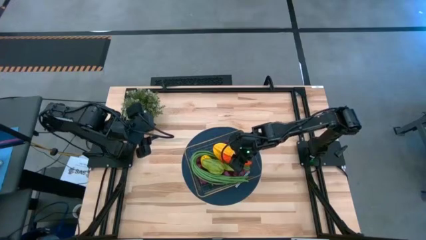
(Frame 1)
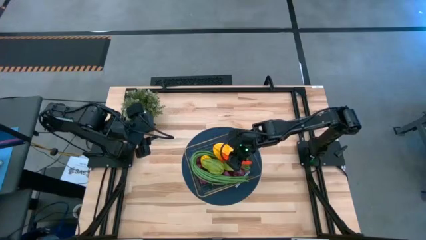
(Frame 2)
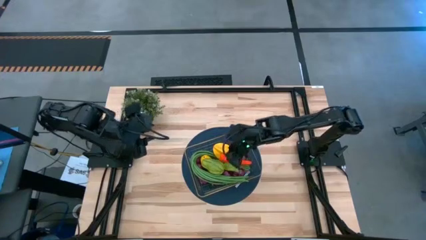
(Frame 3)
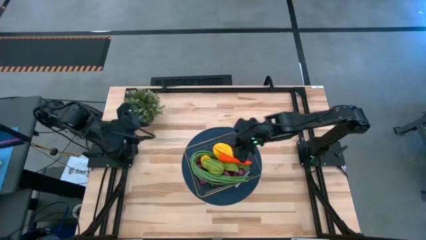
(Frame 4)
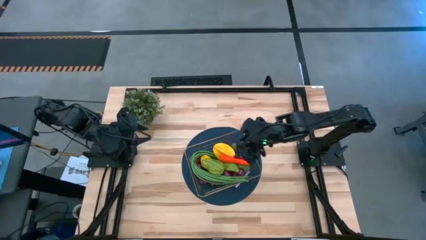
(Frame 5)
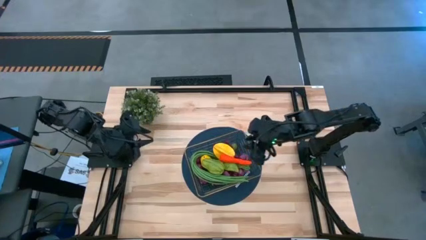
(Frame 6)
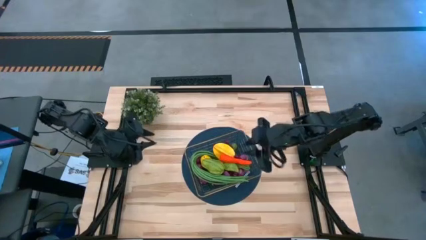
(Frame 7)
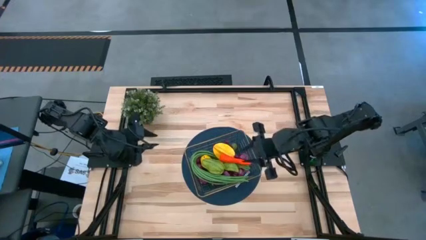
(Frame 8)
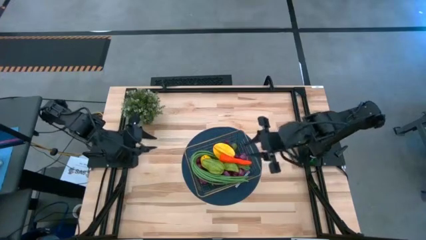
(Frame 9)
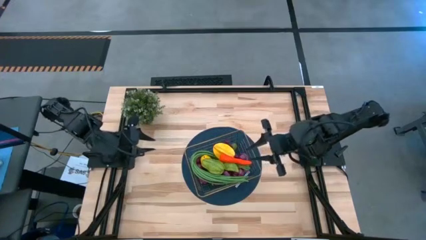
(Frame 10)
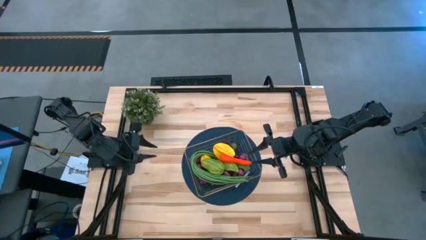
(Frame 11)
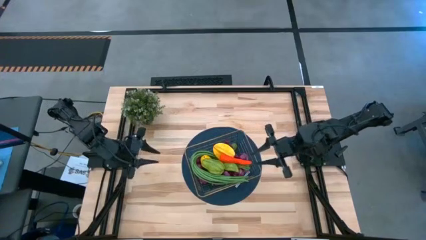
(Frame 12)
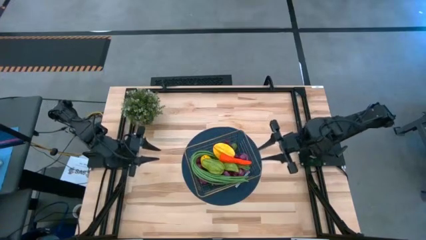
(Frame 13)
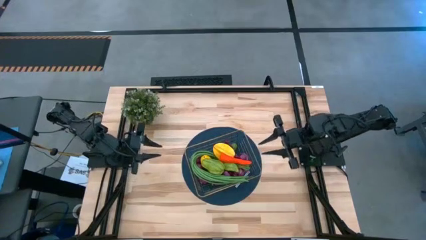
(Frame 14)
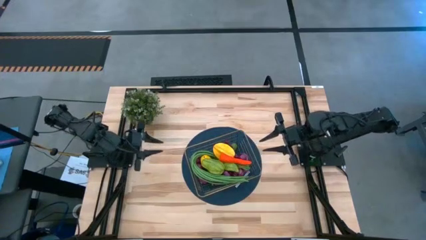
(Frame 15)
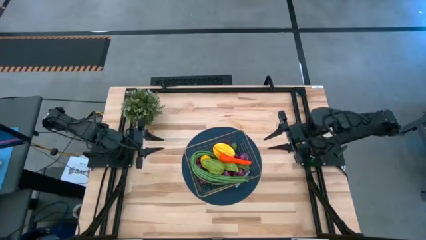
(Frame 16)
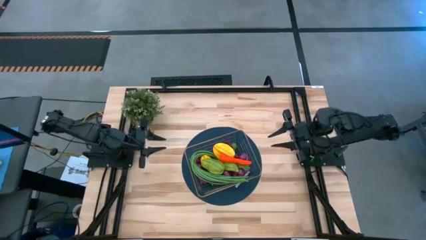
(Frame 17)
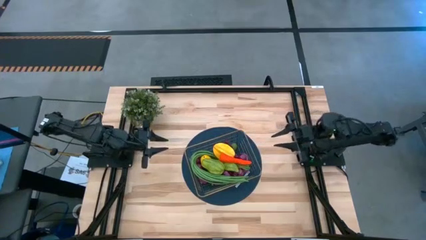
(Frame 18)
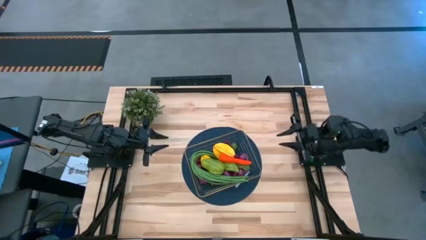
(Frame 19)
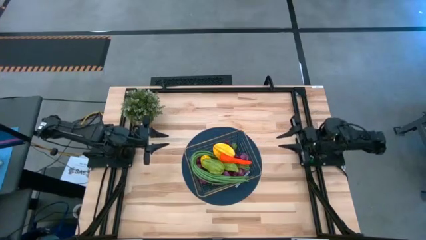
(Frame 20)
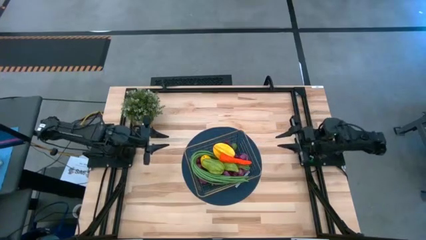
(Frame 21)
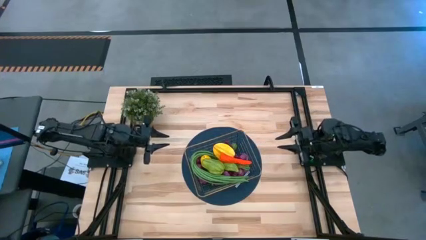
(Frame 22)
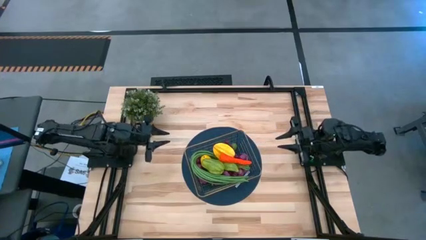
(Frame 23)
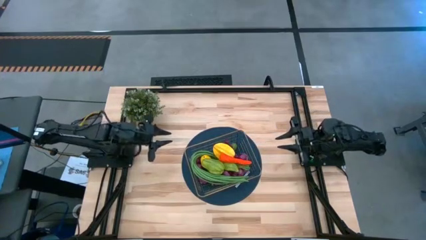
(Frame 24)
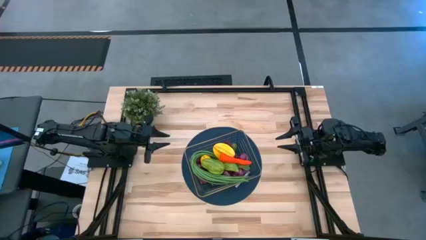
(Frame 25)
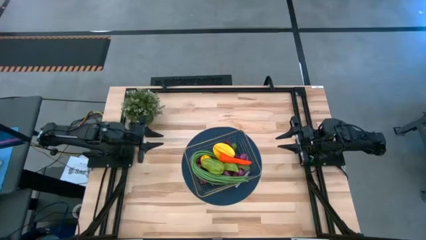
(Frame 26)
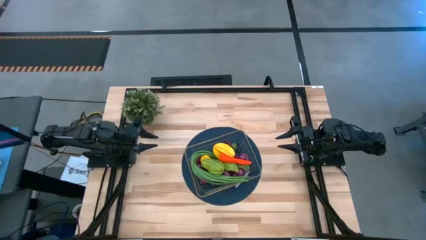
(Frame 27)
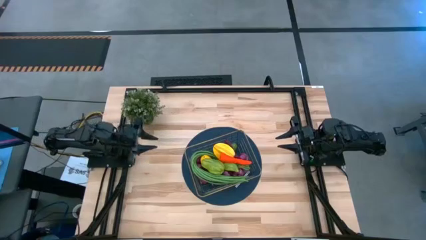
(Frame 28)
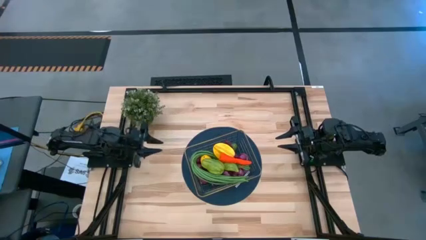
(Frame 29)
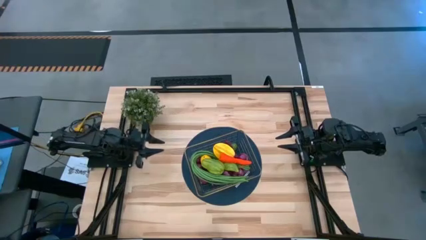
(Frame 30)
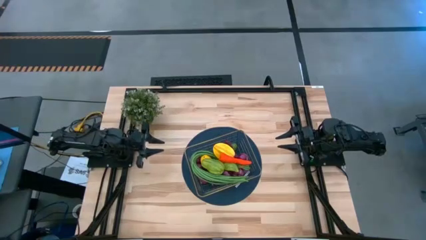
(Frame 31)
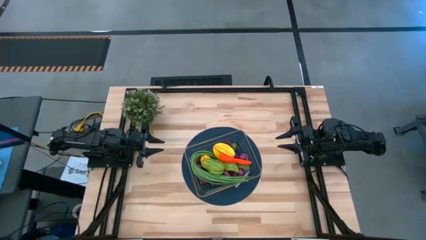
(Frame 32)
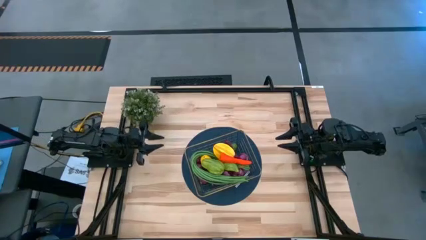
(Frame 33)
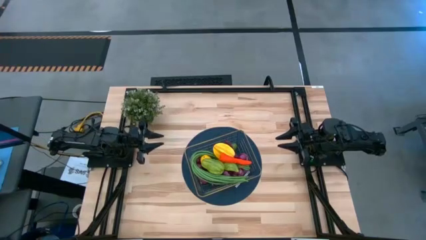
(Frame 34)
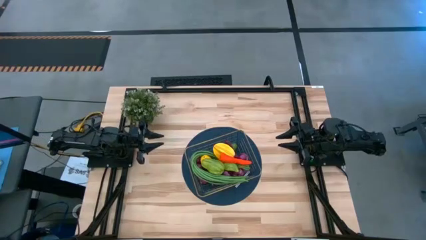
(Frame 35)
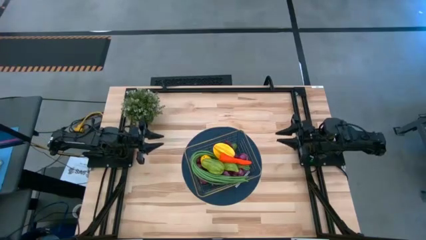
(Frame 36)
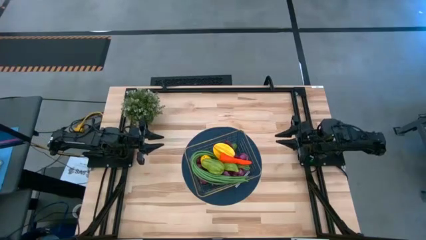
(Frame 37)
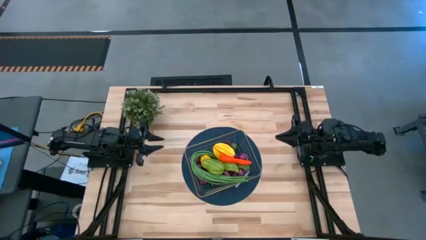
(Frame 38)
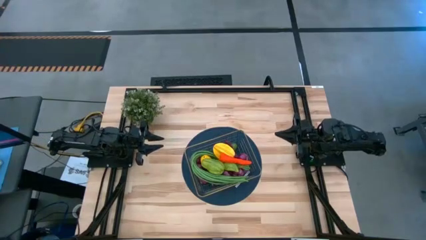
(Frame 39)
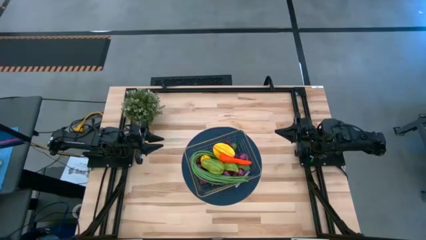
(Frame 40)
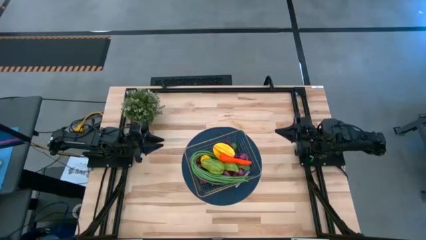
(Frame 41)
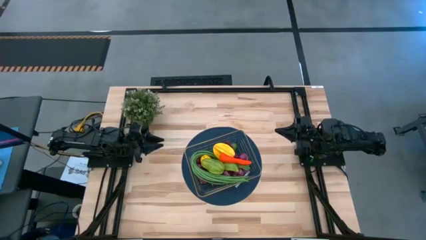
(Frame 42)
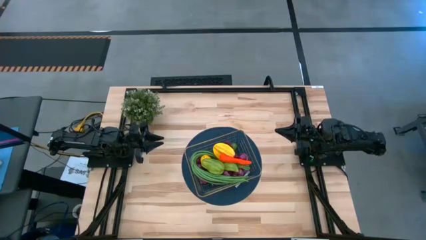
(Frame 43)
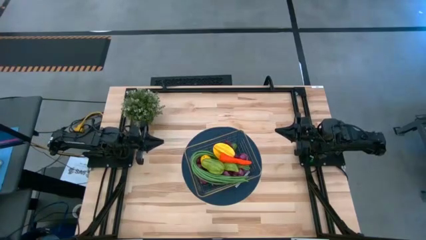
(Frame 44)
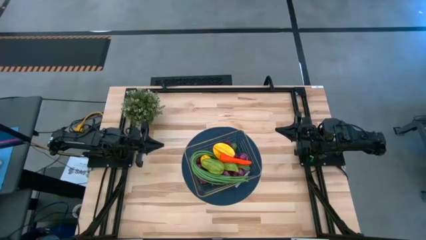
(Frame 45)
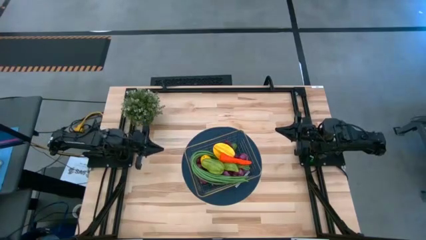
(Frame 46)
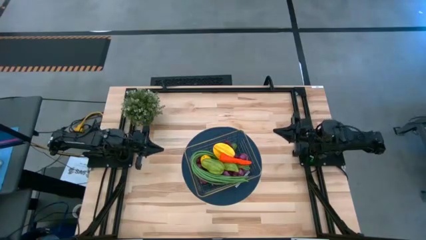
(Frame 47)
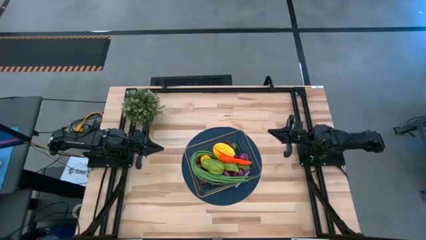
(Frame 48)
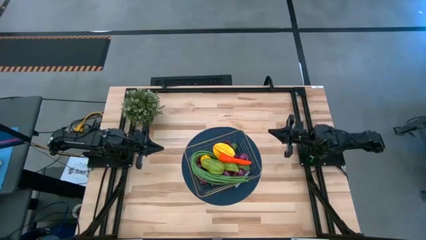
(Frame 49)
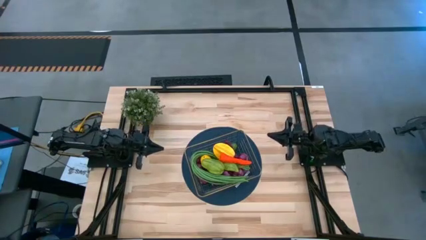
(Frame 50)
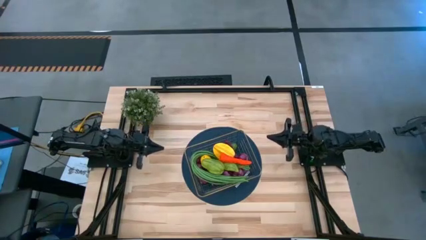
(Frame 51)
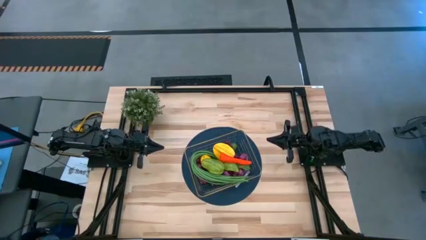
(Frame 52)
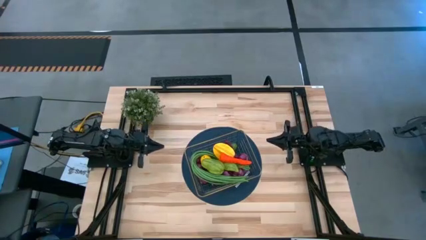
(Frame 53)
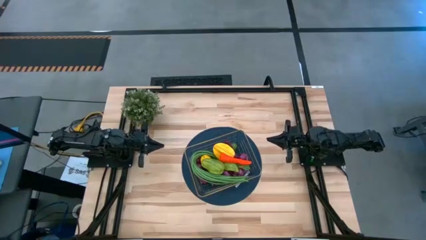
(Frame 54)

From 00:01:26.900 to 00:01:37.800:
Task: Build produce basket
Return to Home Position
